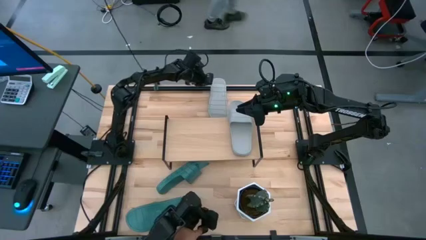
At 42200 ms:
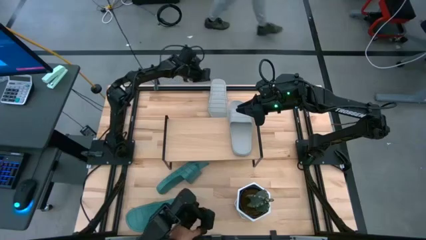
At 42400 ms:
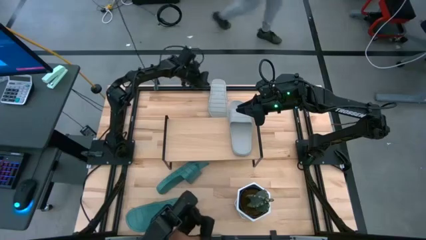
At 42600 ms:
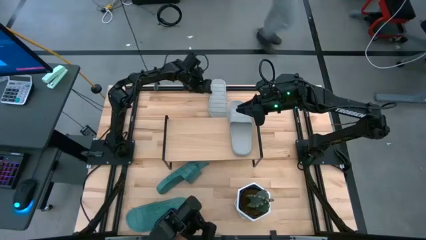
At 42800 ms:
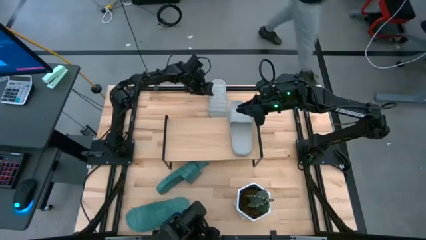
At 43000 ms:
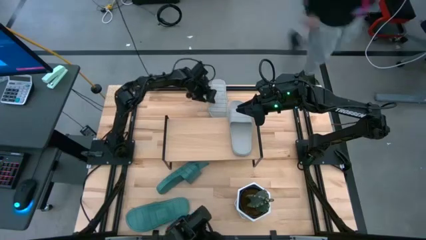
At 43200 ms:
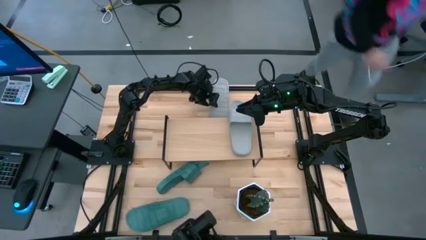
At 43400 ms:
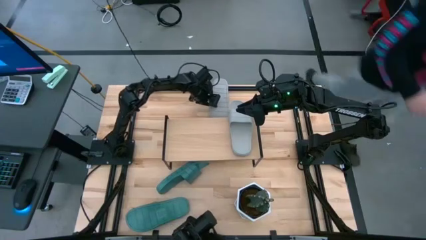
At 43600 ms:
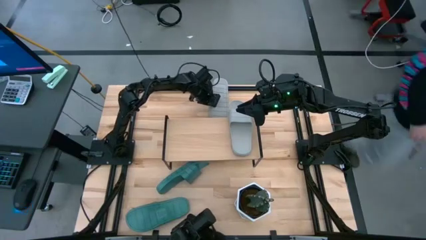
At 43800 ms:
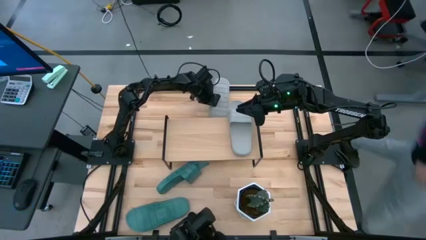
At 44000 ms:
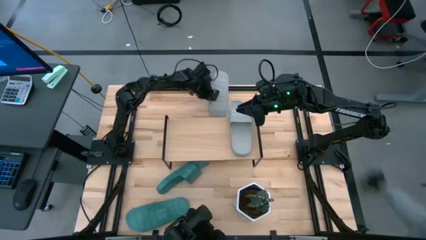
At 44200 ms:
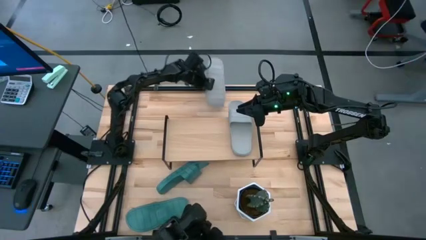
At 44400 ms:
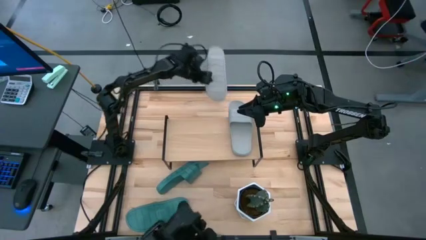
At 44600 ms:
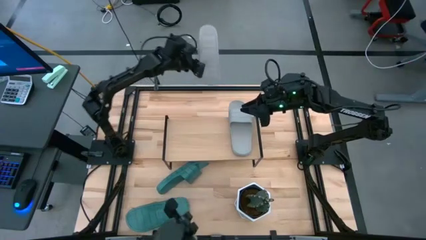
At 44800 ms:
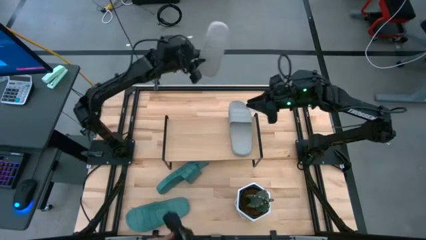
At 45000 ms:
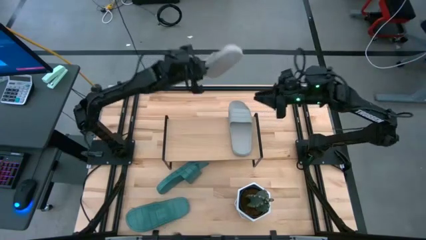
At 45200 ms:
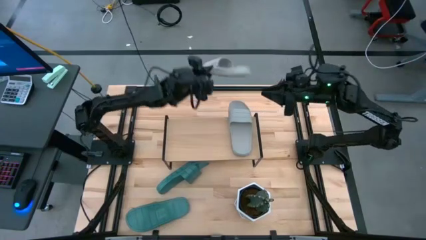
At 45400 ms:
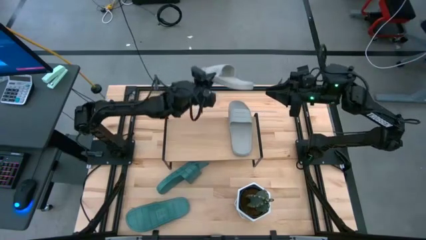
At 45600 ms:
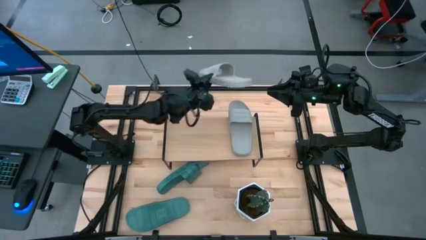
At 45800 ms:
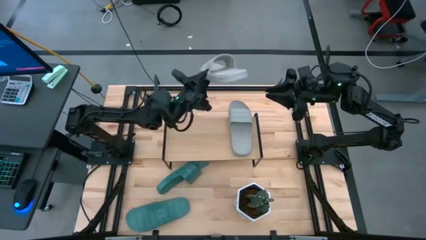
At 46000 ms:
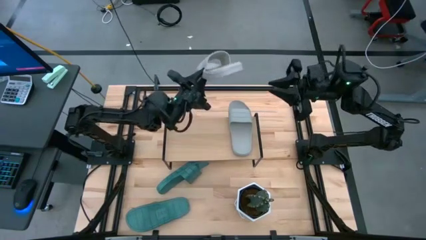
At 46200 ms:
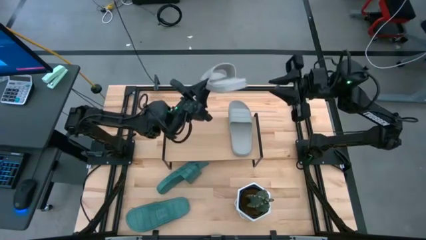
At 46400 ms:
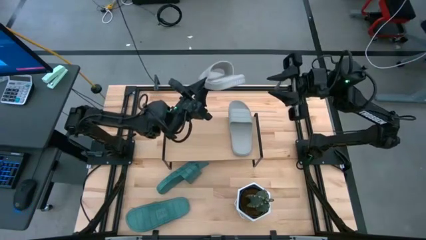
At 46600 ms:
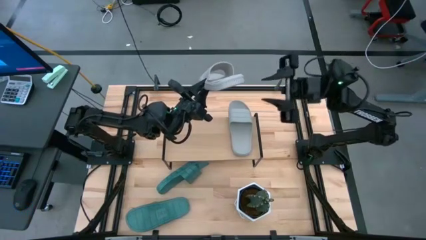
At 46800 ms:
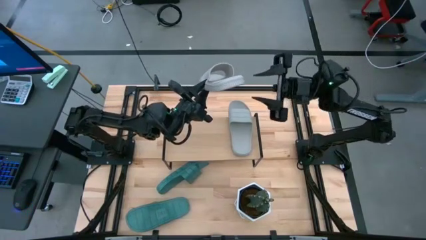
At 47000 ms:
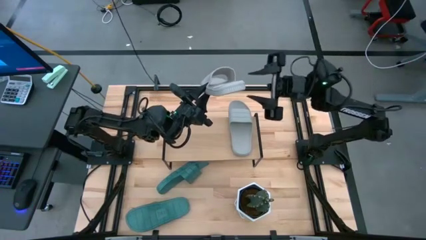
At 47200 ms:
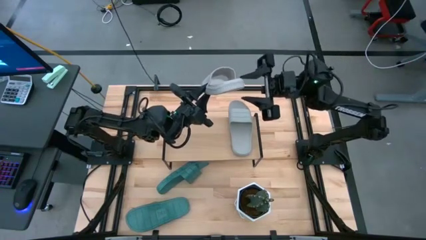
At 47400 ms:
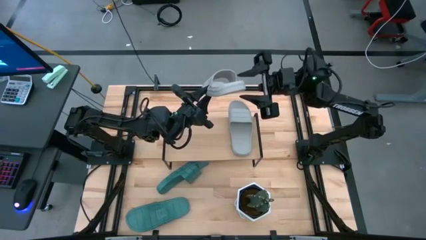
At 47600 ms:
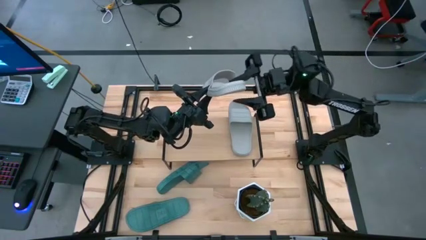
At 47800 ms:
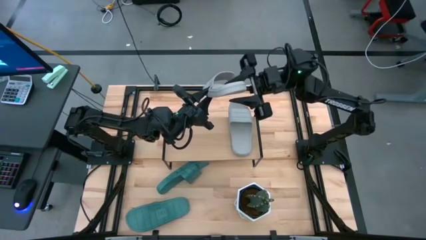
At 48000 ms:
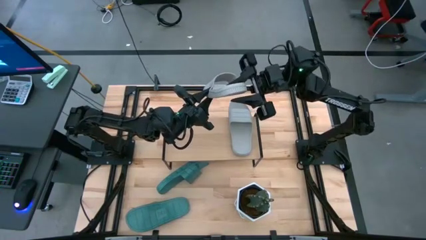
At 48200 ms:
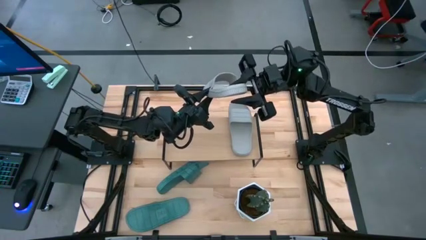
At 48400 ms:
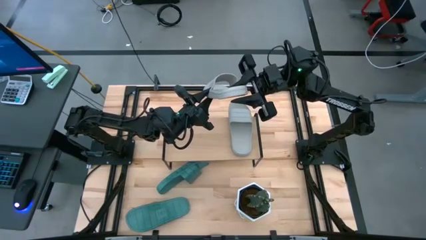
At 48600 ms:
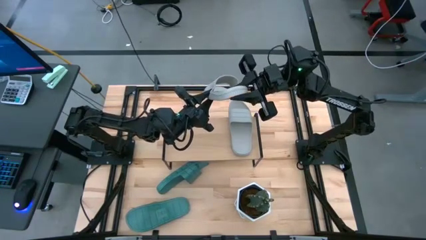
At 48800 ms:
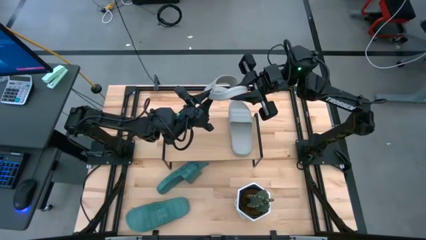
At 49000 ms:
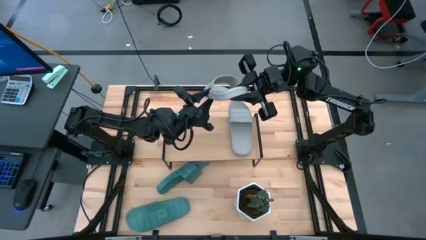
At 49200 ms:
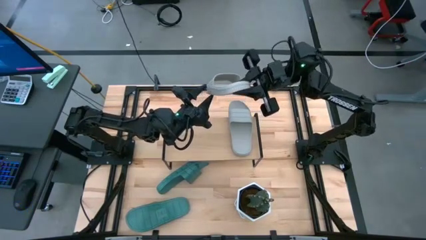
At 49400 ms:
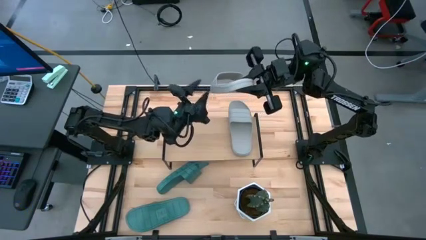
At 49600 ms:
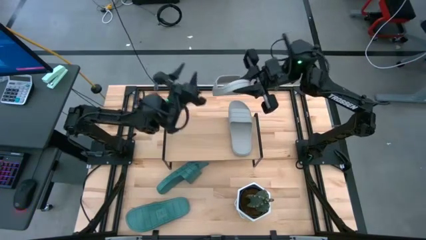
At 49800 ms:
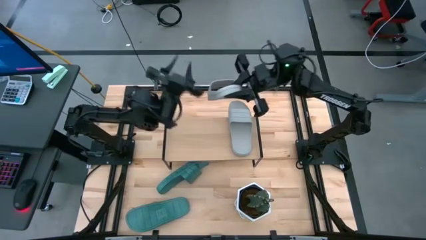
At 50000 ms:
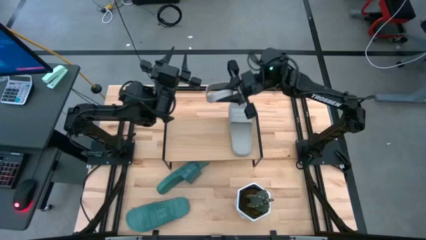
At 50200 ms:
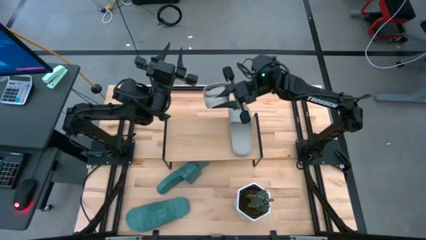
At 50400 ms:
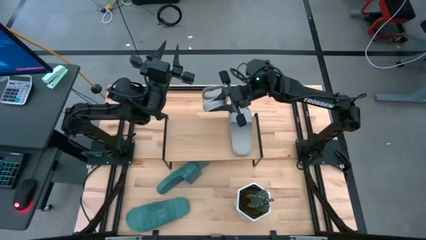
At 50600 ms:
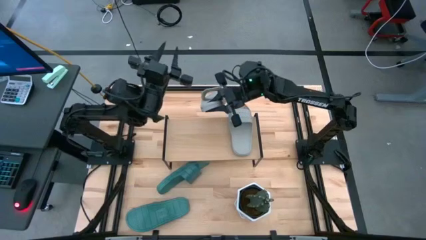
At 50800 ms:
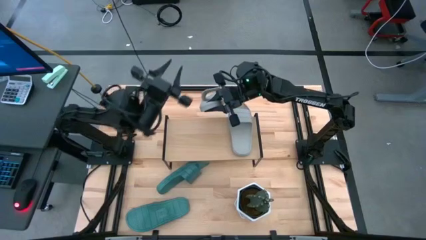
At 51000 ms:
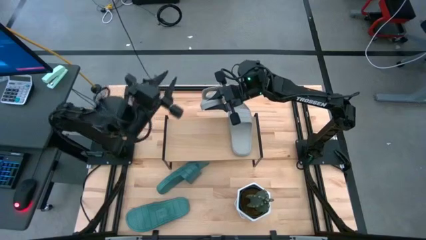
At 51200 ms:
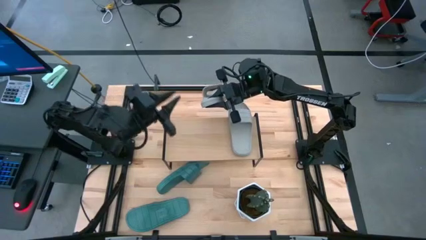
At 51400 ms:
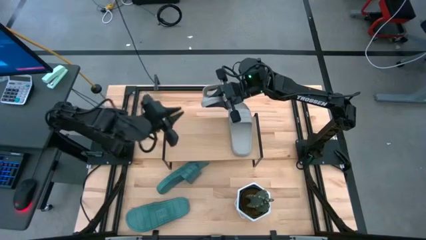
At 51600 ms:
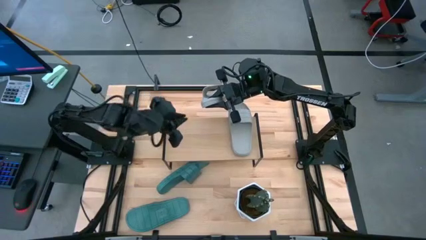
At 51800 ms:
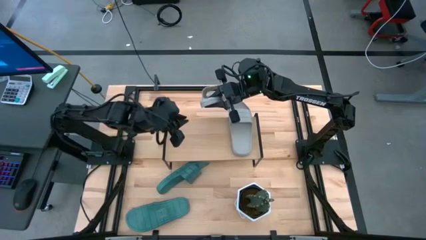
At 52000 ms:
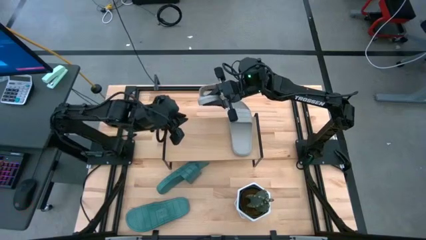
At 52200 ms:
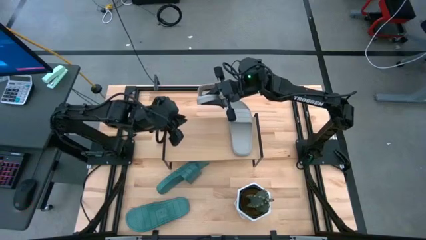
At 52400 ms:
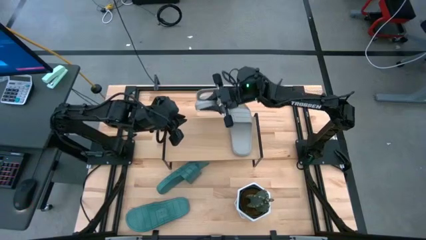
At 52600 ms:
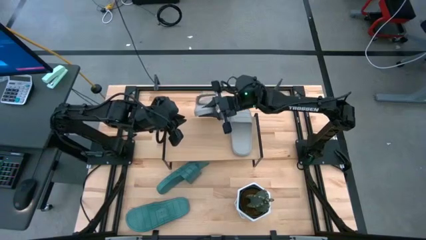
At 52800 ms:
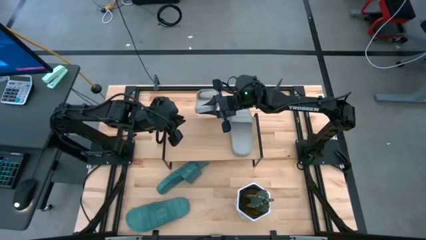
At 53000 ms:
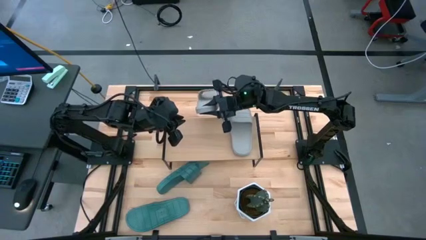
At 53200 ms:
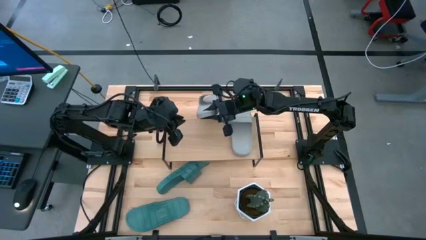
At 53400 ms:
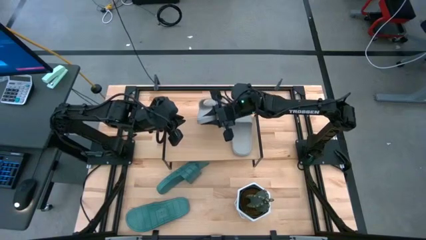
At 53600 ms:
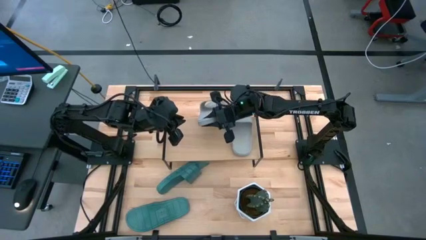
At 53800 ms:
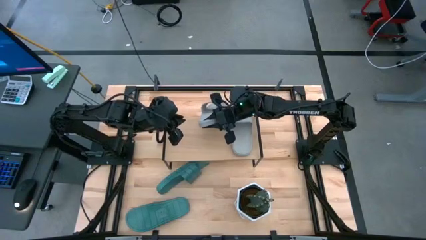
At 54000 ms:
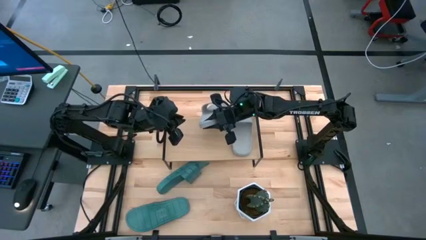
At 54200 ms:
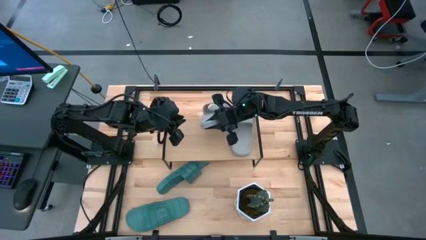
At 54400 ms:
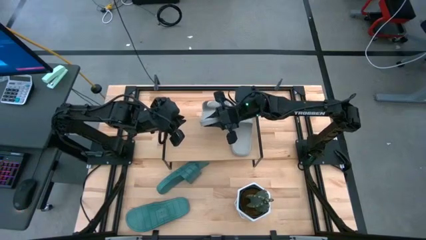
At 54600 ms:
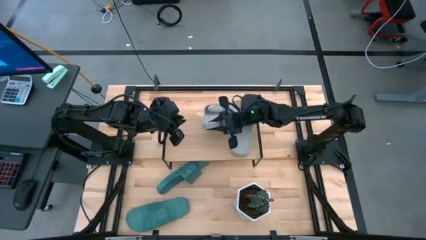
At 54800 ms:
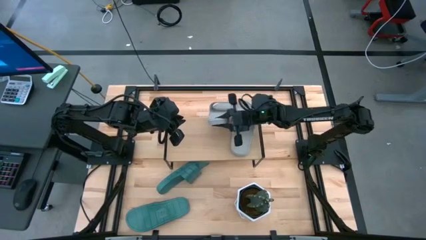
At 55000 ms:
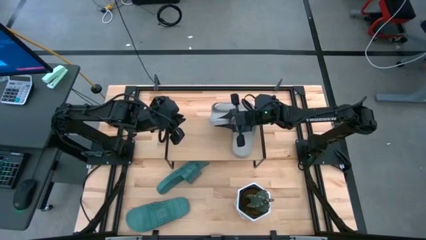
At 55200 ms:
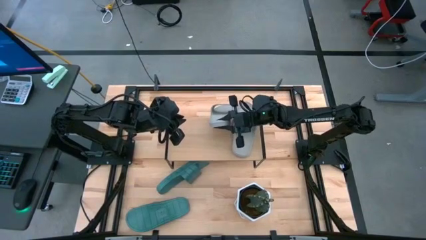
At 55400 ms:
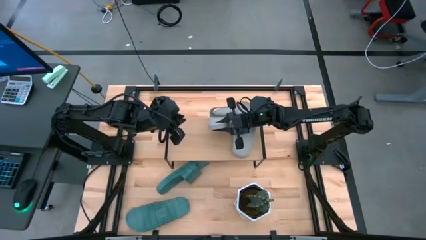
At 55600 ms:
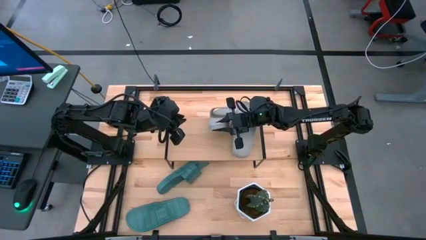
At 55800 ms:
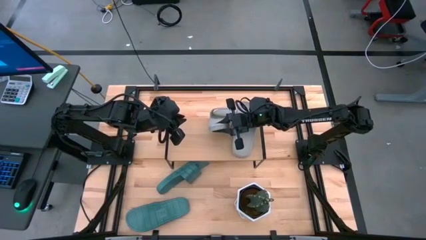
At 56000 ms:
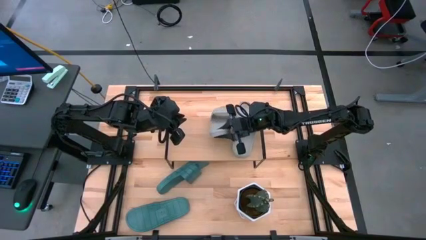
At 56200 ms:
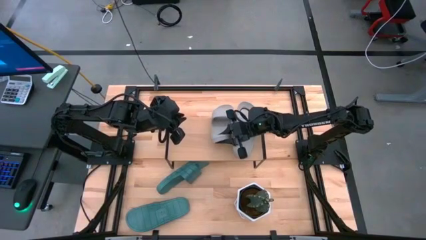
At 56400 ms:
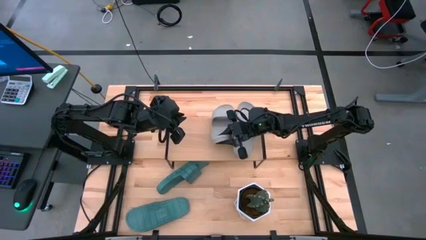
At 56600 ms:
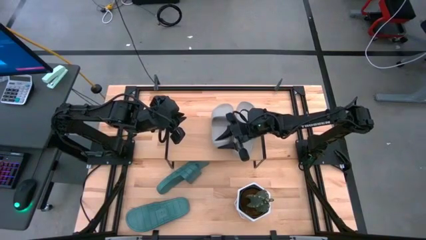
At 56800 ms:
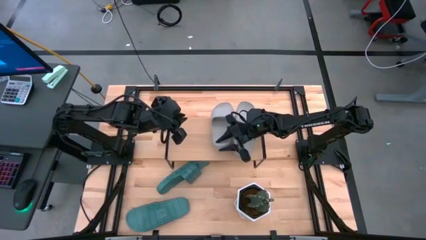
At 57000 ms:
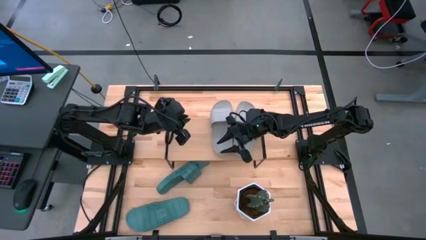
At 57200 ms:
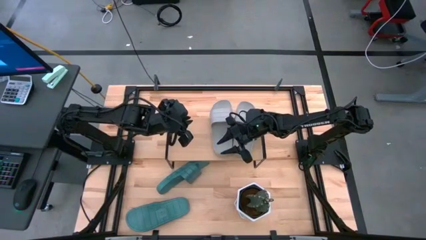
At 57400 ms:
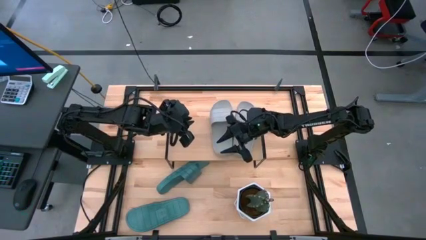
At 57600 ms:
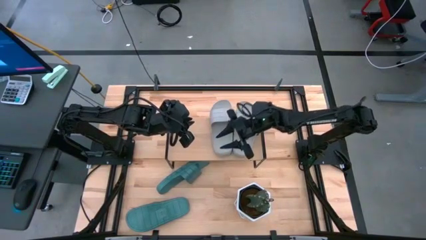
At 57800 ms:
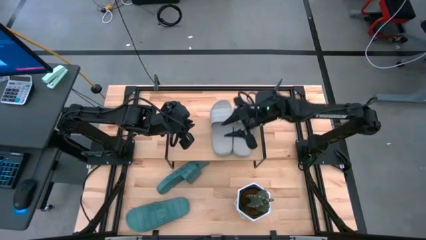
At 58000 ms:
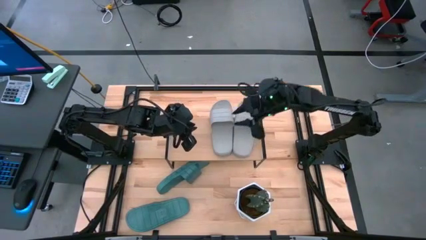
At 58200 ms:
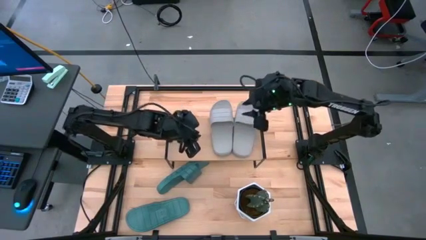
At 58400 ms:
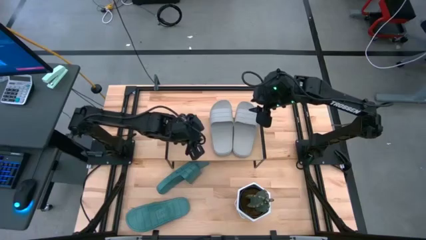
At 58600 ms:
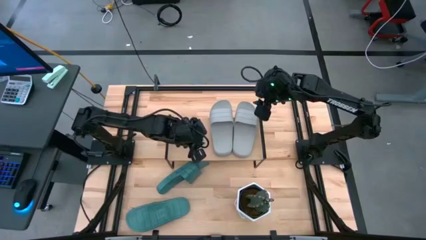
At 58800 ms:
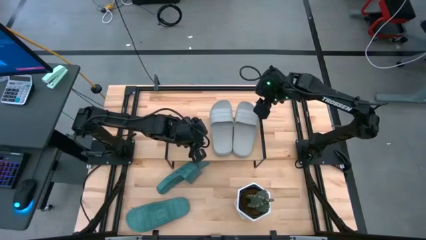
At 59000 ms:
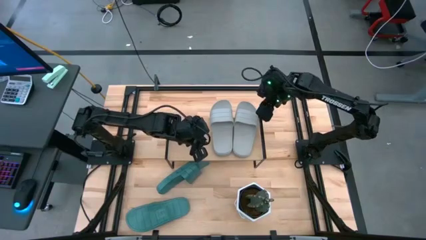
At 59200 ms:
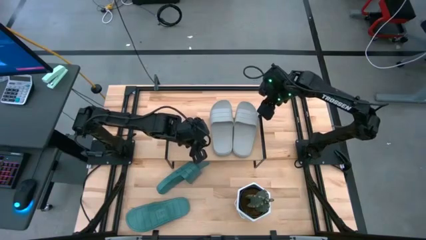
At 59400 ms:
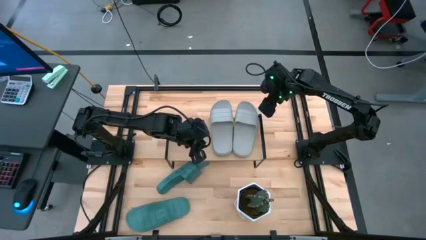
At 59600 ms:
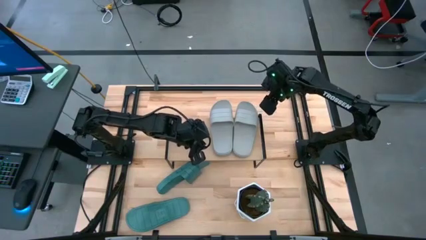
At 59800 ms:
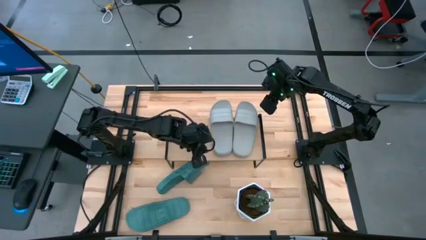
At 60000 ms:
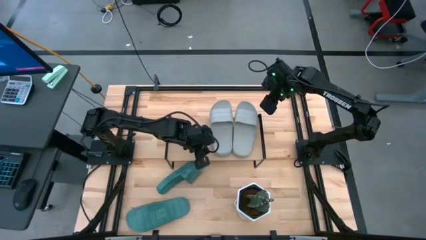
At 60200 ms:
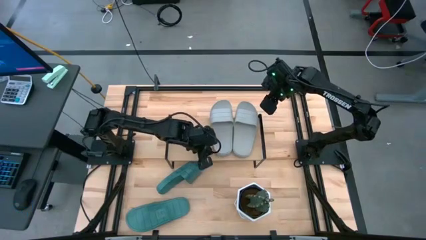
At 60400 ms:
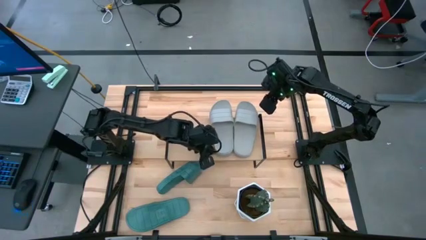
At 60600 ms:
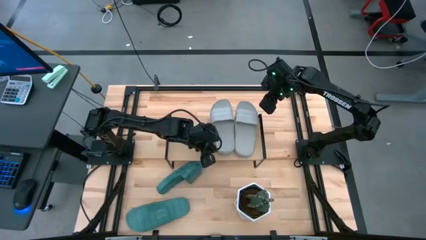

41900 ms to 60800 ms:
Task: Pick and place slides into the shelf
Put the gray slide on the shelf
